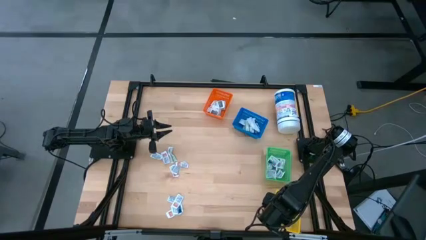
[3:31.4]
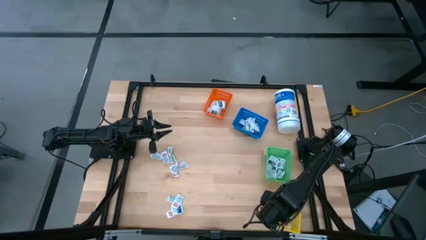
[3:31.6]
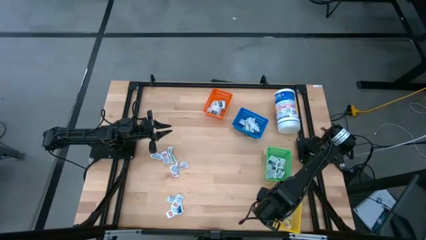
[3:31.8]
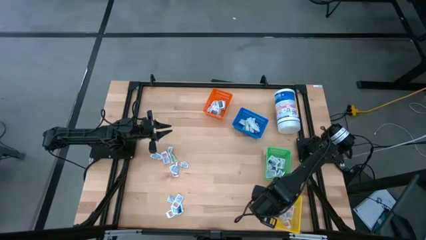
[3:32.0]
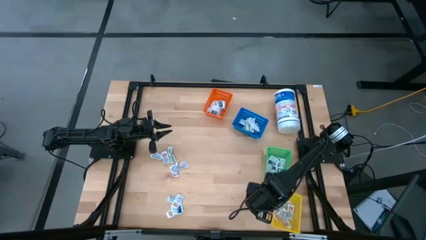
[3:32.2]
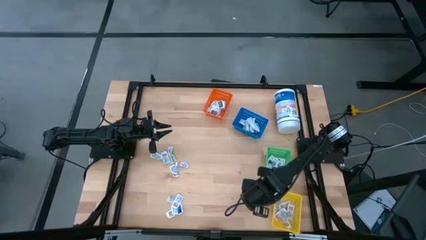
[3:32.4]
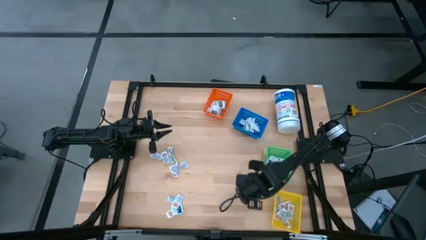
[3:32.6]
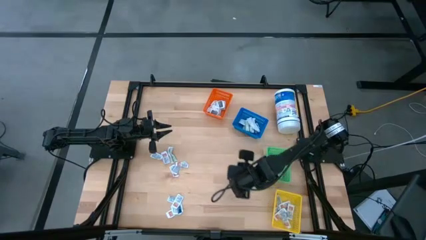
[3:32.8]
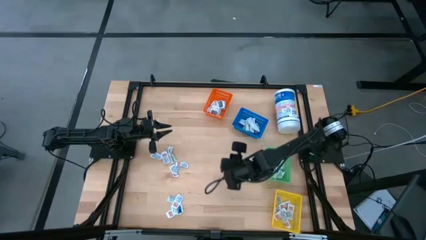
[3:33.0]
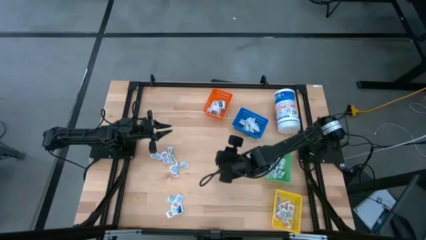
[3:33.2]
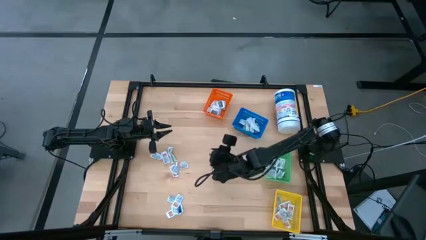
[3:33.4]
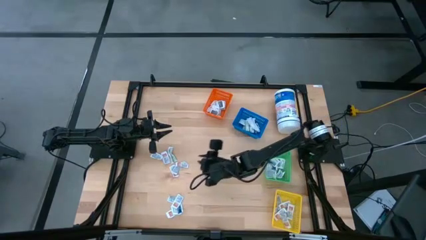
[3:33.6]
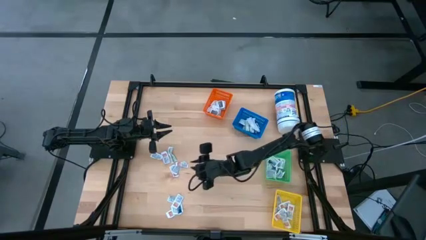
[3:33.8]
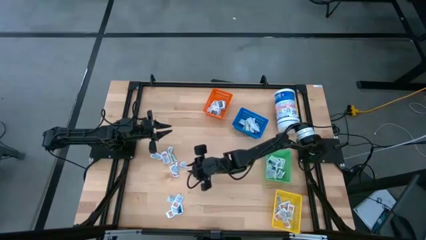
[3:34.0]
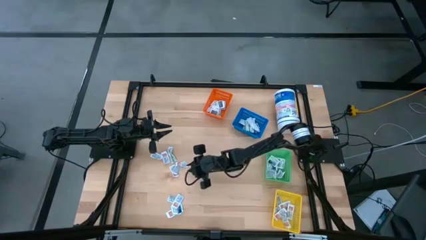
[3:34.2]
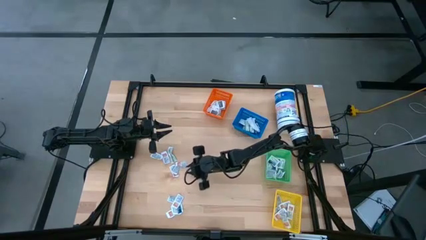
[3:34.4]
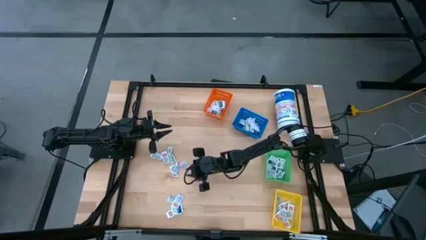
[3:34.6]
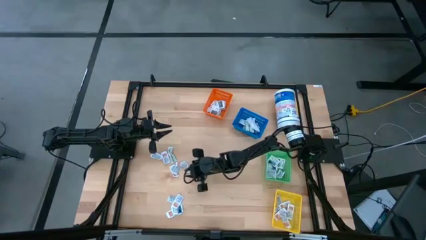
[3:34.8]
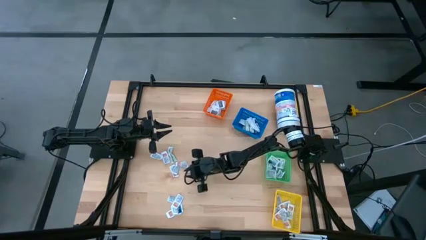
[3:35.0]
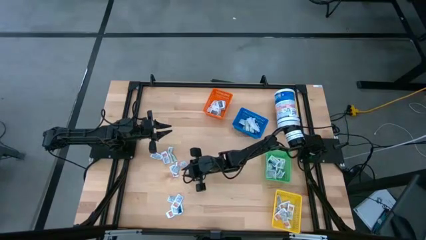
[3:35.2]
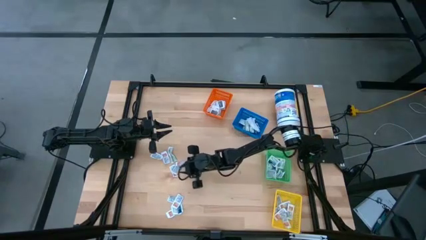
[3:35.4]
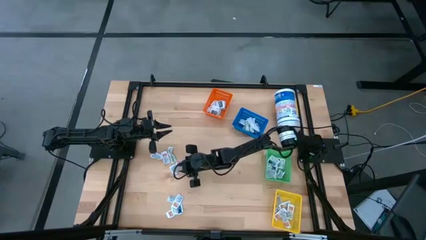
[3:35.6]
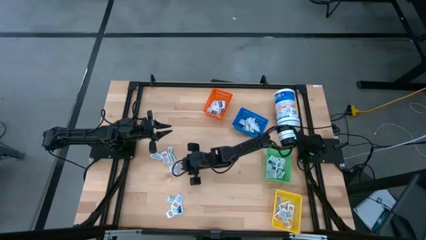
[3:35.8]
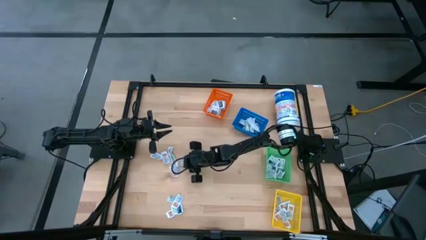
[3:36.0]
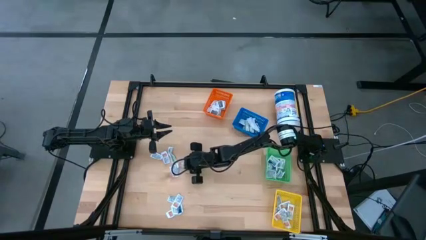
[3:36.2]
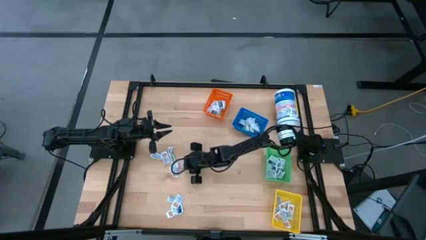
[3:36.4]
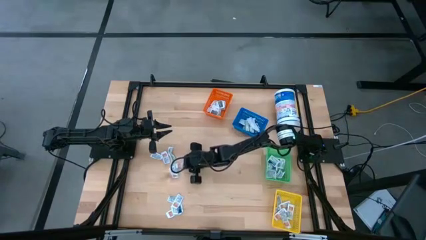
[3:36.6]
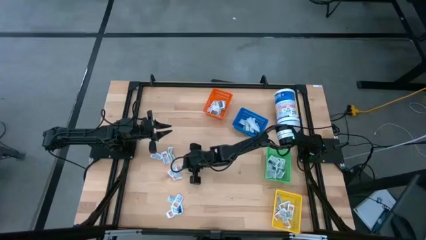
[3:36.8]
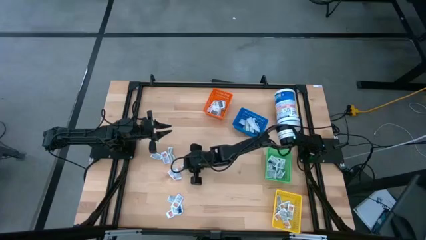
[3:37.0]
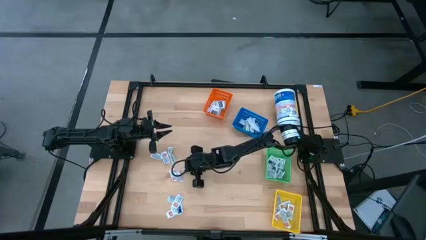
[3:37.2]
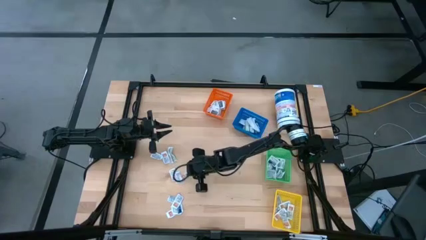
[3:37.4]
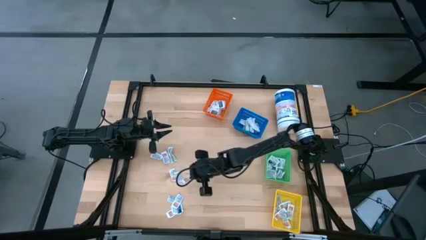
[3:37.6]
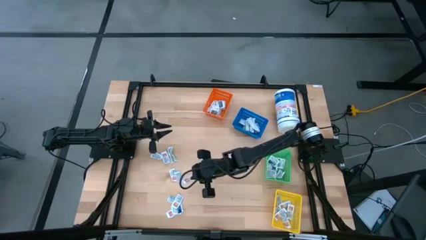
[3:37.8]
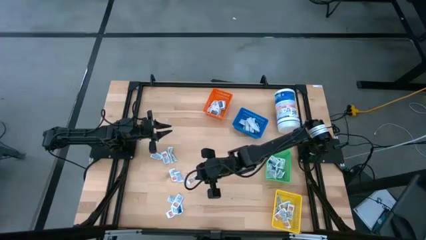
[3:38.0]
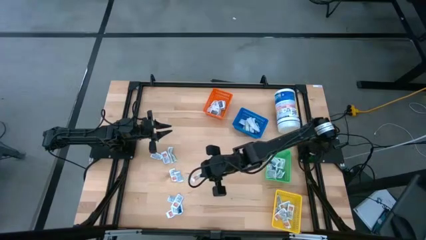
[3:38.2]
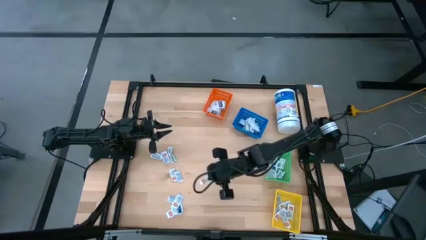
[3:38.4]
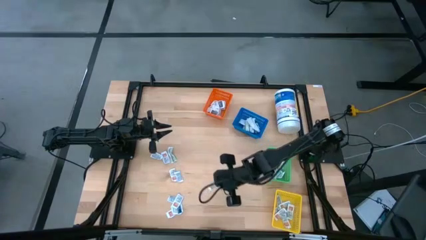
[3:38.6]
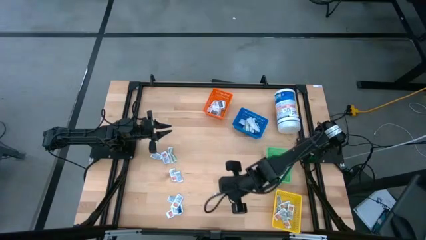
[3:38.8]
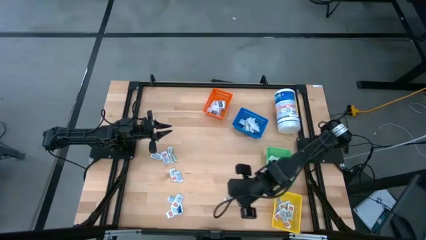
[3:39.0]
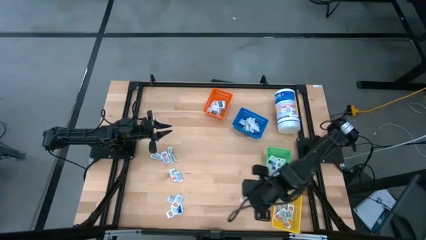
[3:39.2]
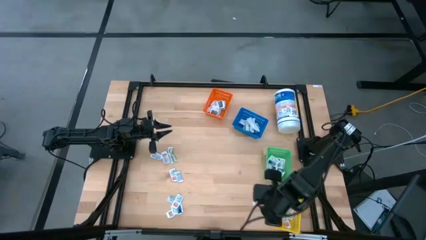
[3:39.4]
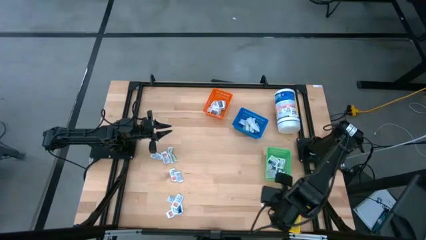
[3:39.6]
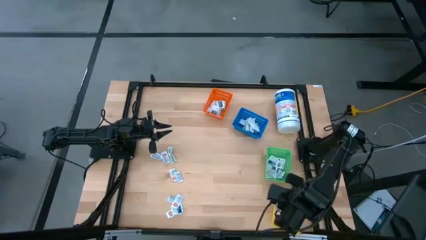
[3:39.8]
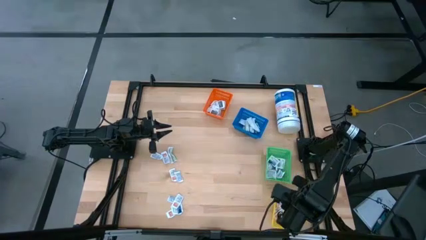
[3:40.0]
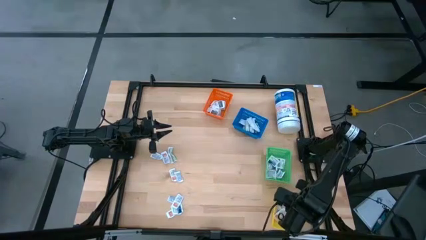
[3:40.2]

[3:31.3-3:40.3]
Task: Pick & Place First Aid Supplies
Put the orange ointment pack into the yellow basket

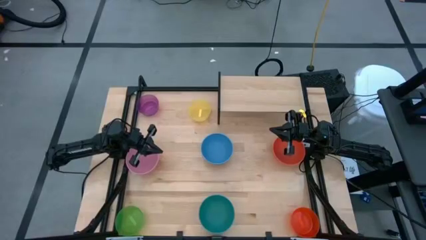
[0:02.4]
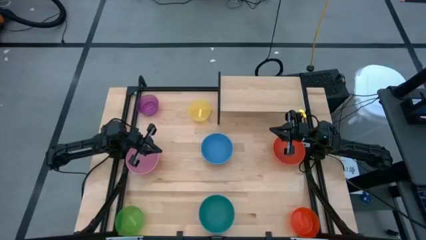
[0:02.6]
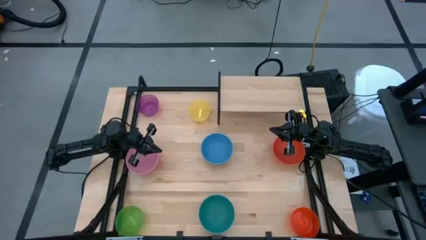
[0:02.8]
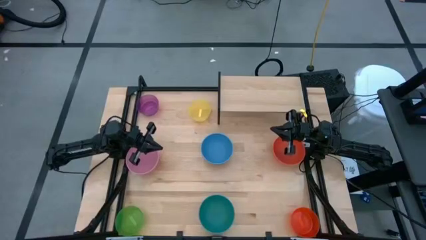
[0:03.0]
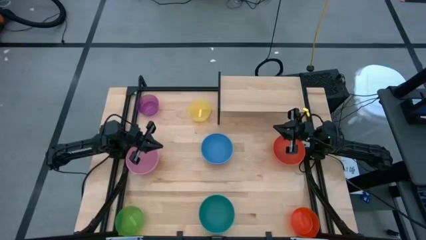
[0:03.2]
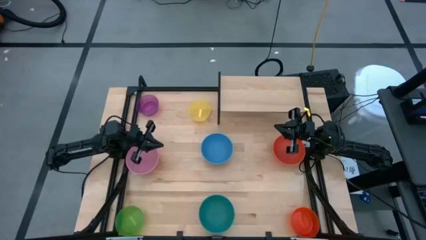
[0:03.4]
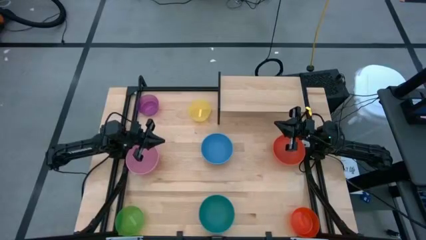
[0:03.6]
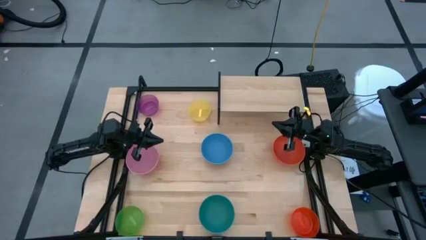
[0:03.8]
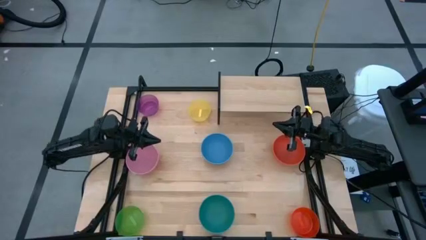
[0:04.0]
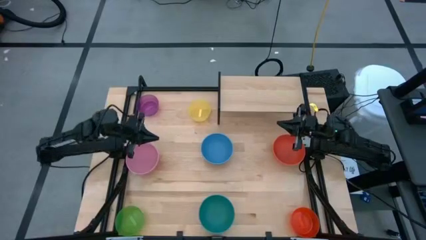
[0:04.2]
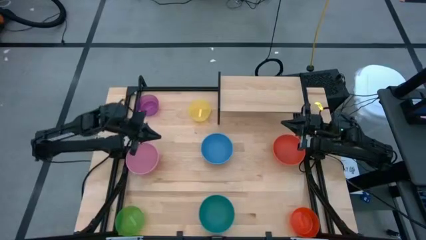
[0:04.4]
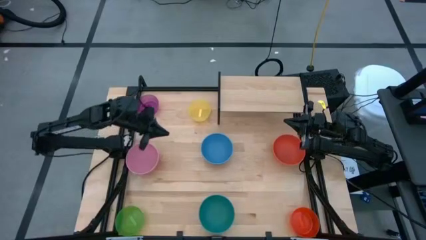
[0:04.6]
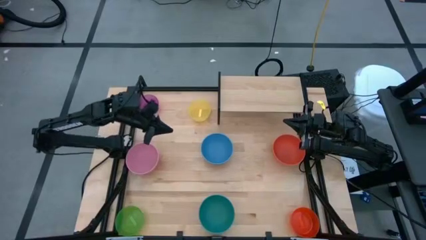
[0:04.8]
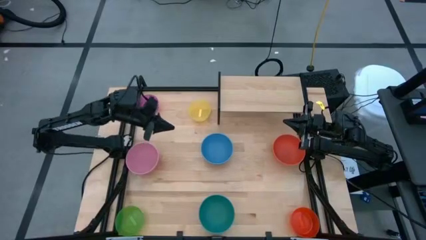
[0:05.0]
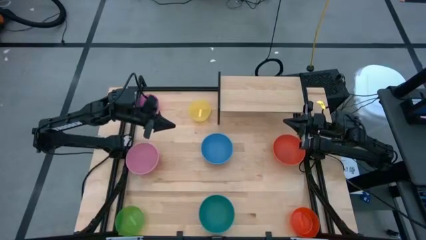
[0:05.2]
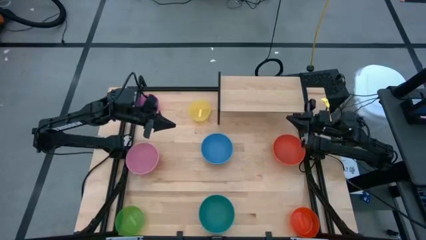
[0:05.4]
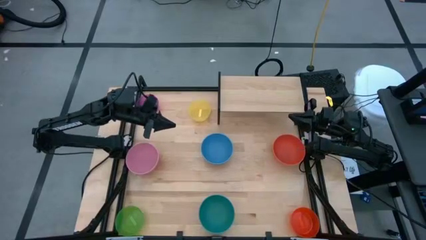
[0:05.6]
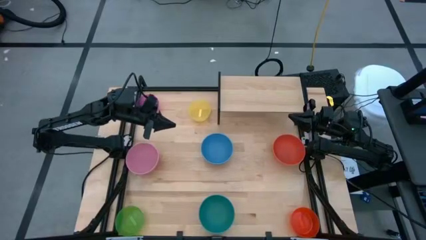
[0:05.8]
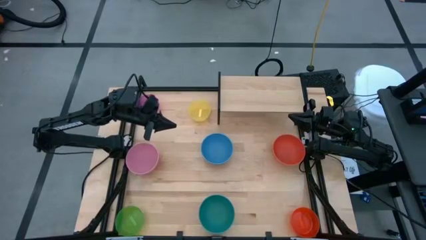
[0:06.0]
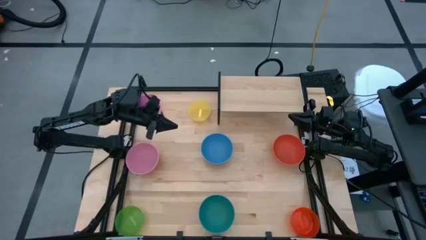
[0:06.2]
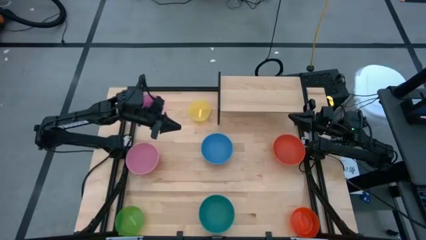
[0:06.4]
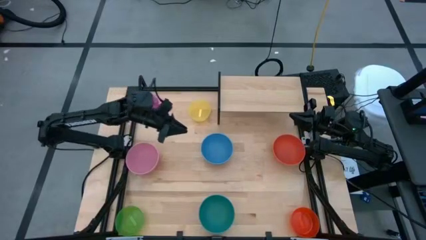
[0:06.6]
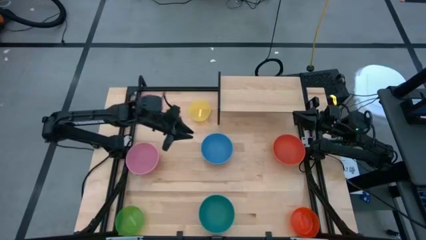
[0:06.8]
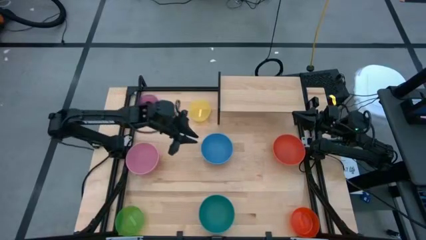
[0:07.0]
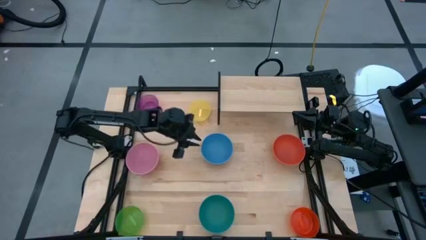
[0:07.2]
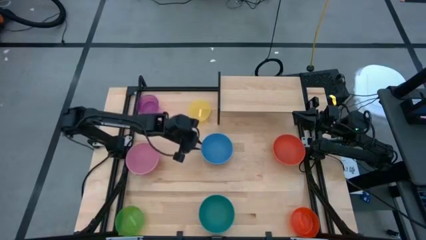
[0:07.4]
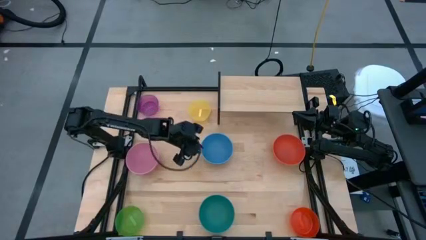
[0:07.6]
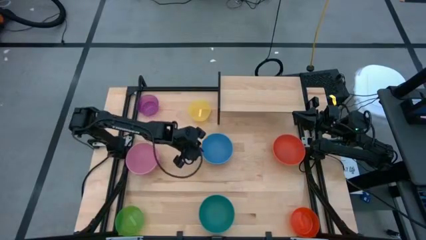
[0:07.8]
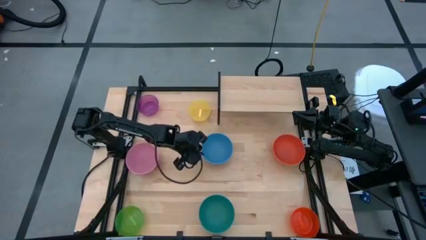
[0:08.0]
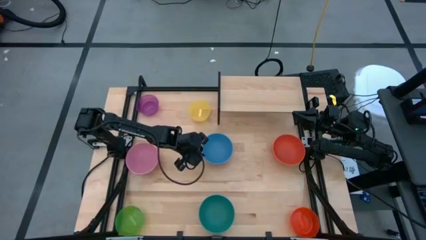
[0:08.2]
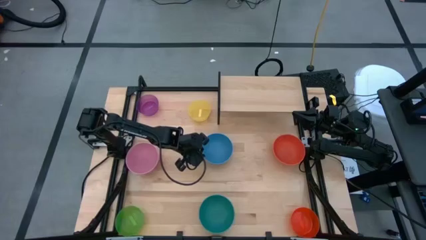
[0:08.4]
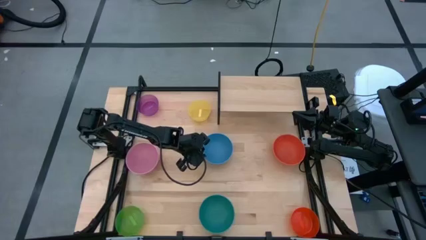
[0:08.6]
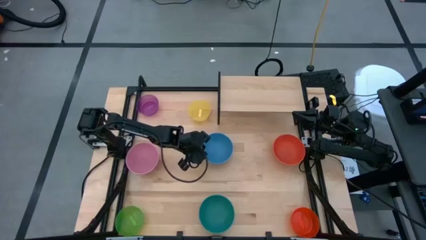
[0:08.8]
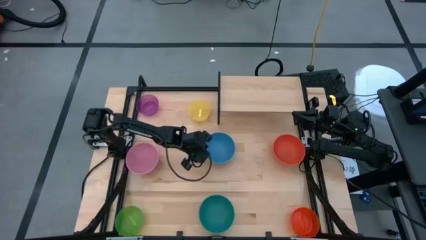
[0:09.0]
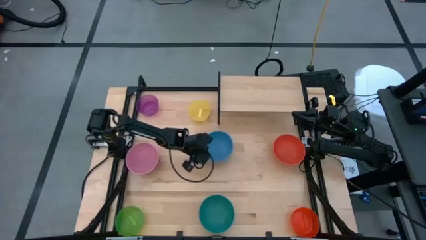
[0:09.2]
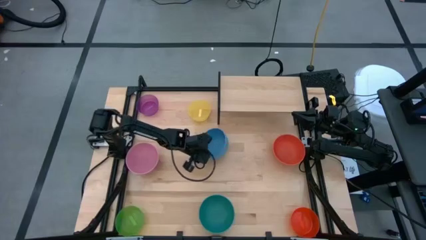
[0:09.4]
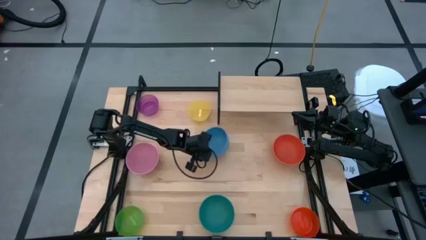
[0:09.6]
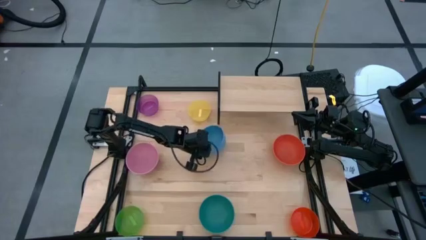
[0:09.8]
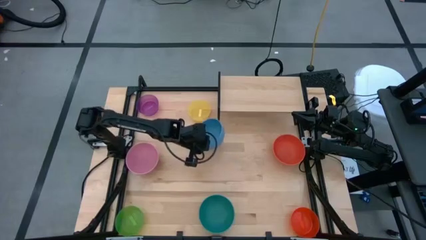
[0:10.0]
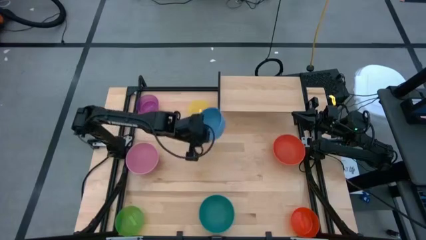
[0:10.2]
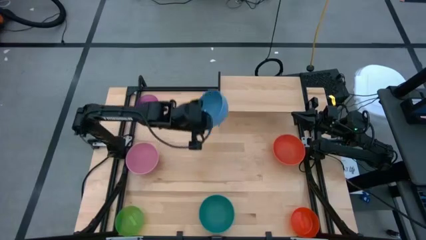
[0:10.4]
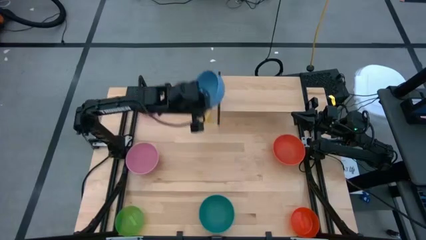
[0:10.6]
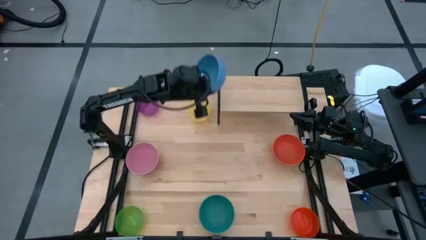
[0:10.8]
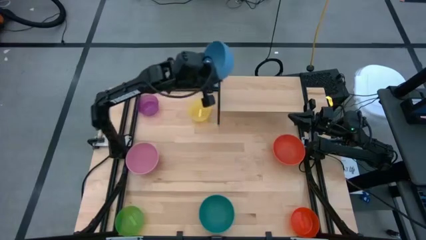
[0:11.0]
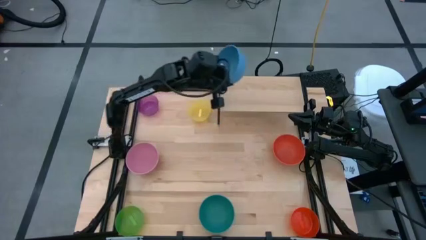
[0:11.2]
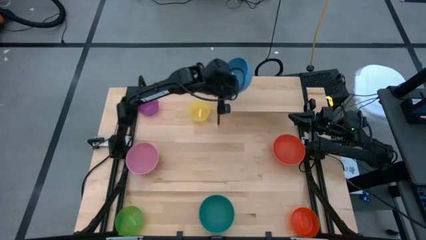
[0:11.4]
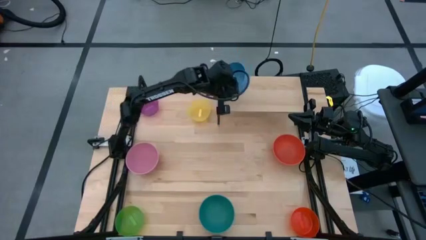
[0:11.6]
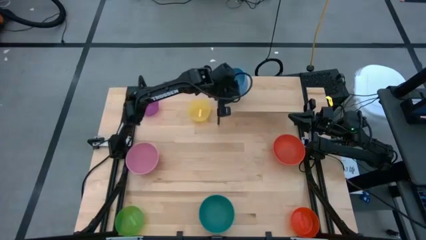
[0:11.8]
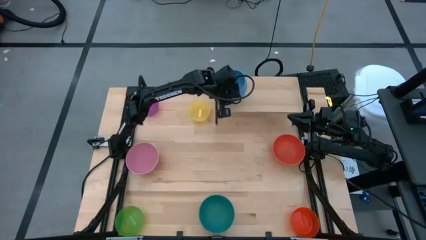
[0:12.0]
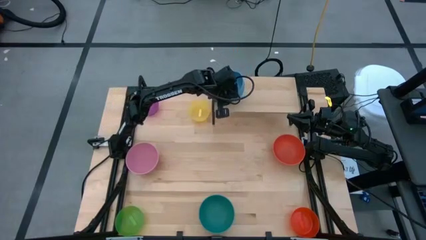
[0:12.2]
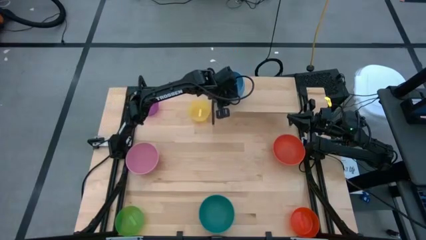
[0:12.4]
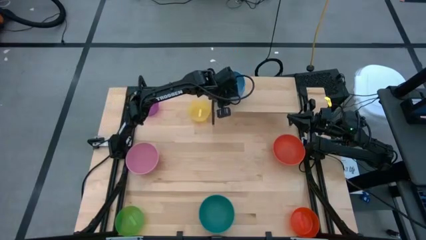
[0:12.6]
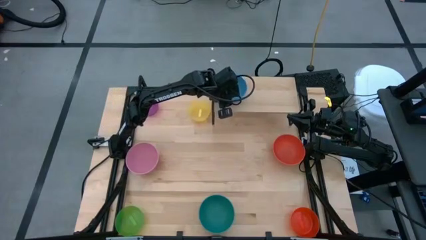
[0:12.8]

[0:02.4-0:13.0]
Task: Place and stack bowls onto a shelf
Put the blue bowl onto the shelf
